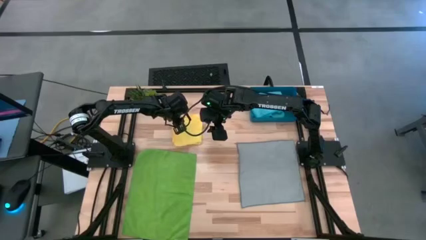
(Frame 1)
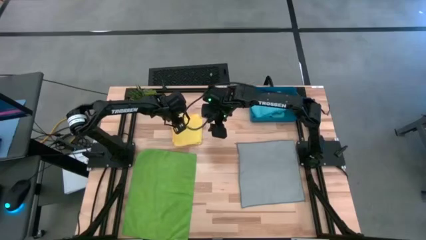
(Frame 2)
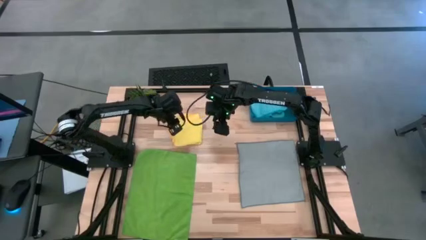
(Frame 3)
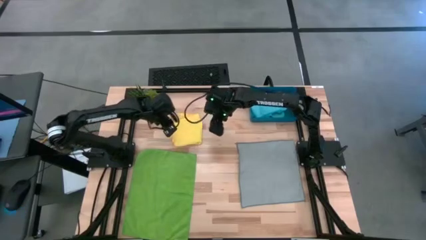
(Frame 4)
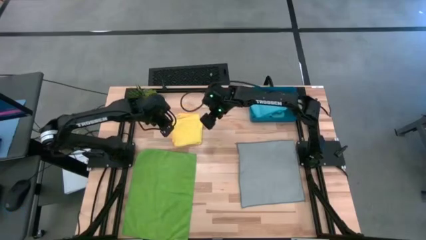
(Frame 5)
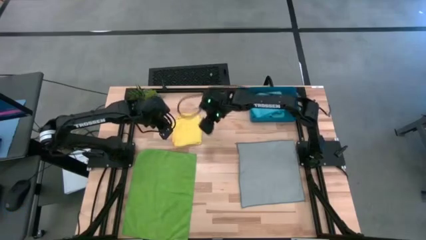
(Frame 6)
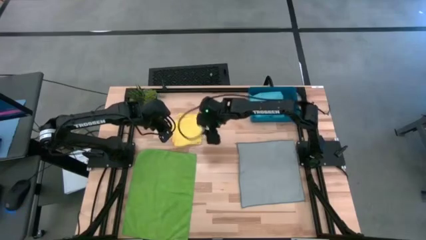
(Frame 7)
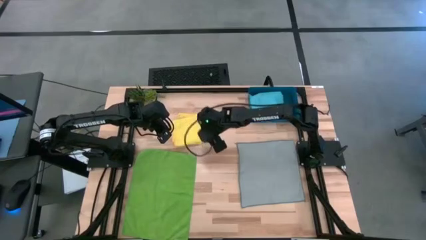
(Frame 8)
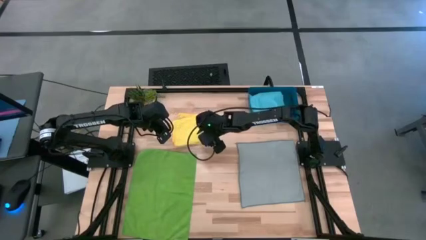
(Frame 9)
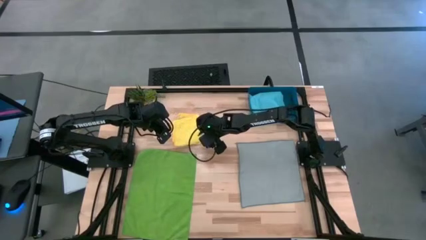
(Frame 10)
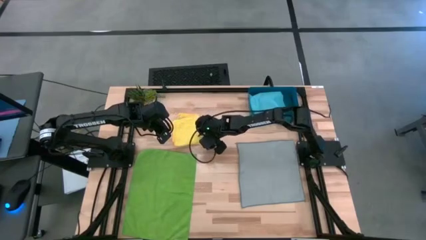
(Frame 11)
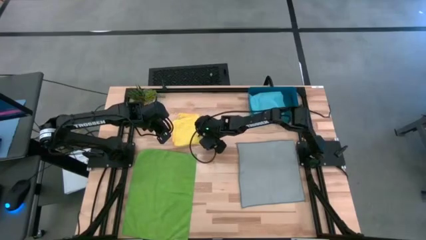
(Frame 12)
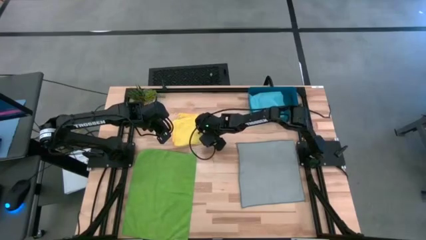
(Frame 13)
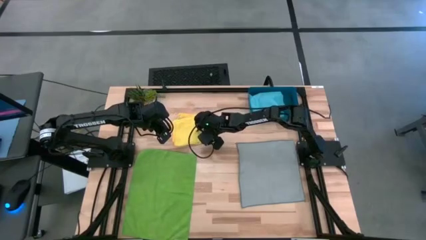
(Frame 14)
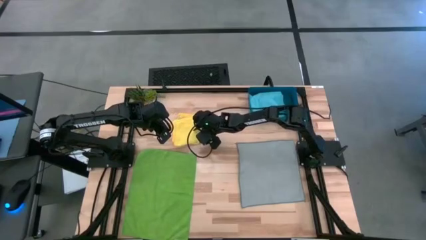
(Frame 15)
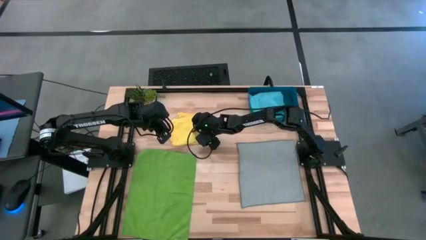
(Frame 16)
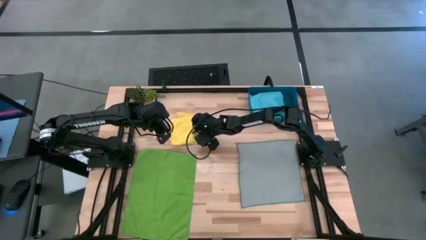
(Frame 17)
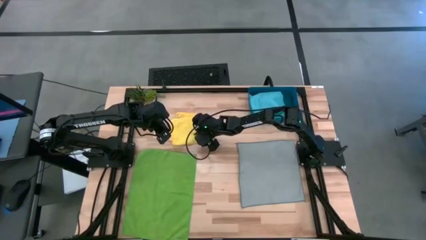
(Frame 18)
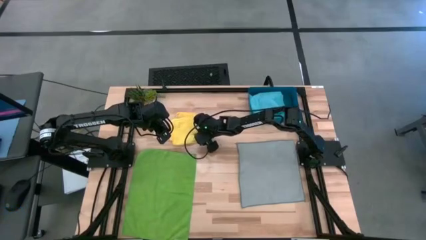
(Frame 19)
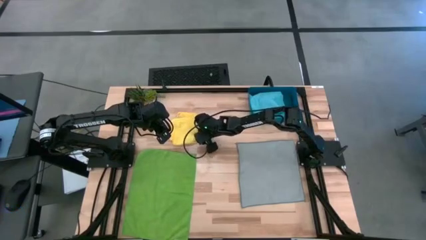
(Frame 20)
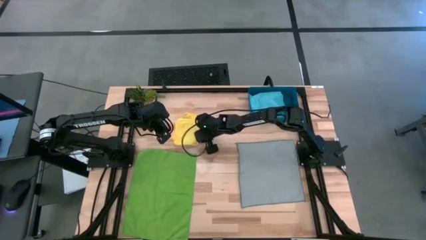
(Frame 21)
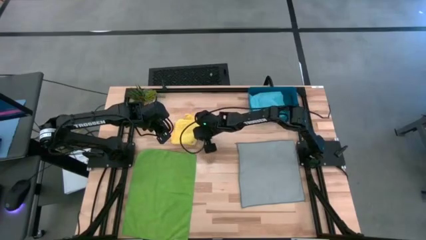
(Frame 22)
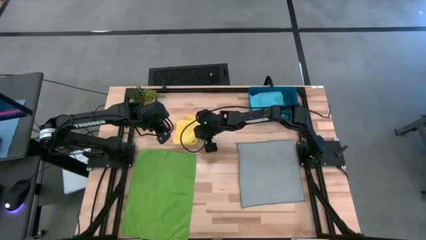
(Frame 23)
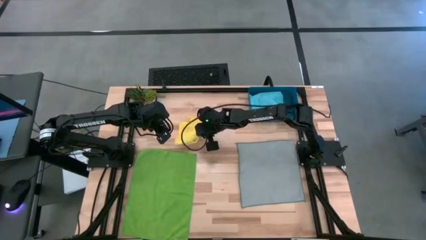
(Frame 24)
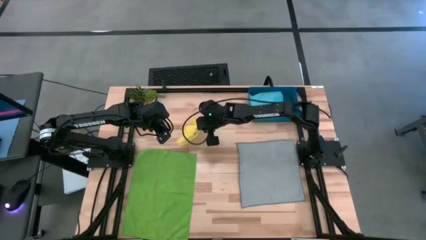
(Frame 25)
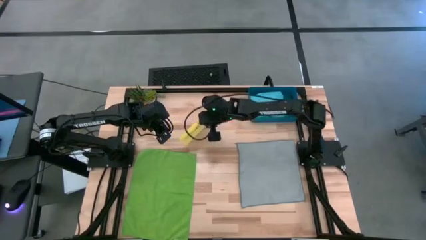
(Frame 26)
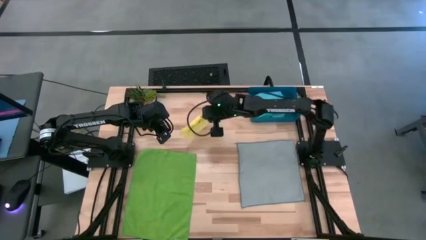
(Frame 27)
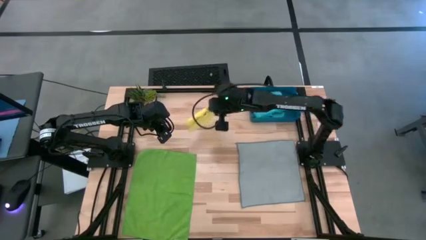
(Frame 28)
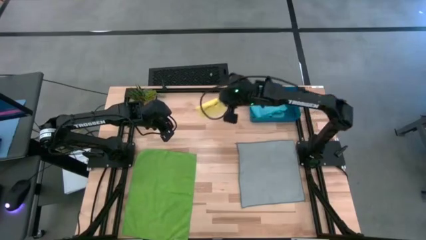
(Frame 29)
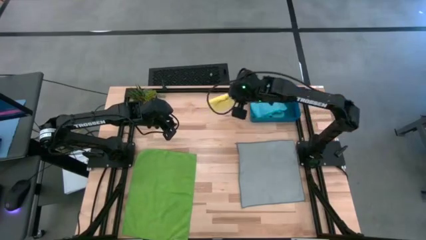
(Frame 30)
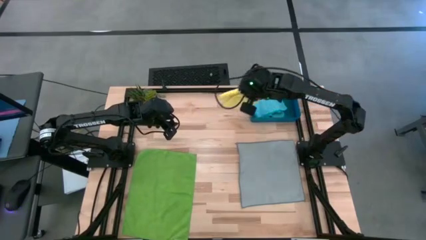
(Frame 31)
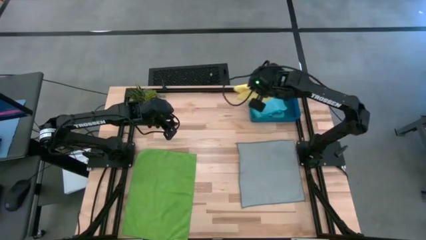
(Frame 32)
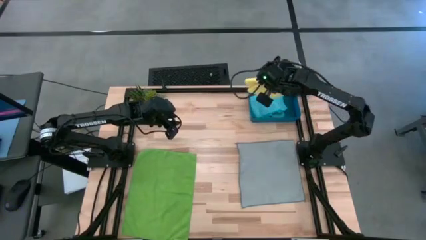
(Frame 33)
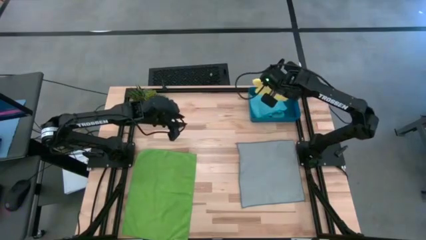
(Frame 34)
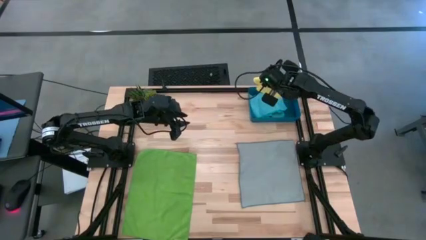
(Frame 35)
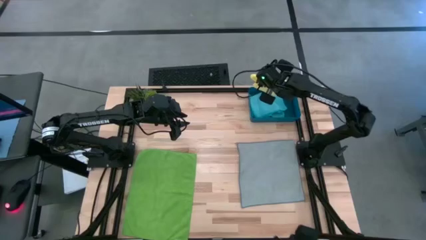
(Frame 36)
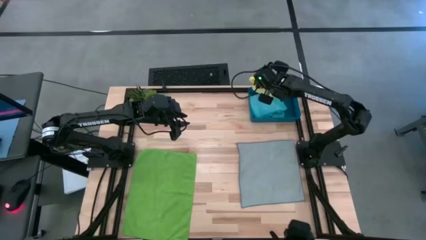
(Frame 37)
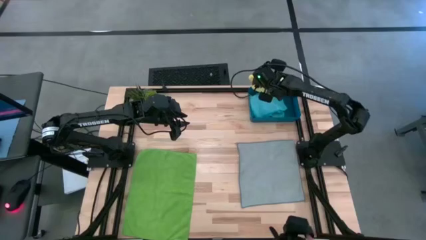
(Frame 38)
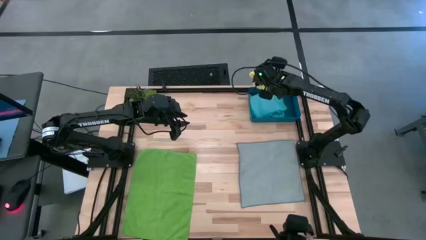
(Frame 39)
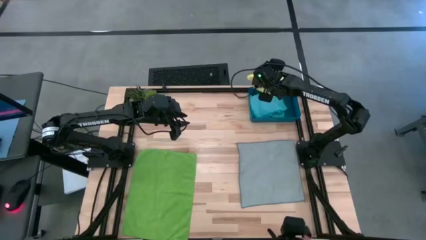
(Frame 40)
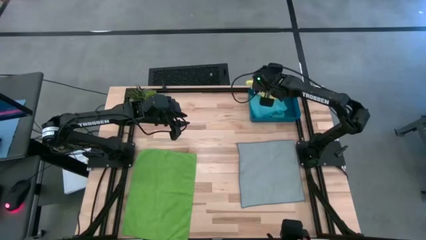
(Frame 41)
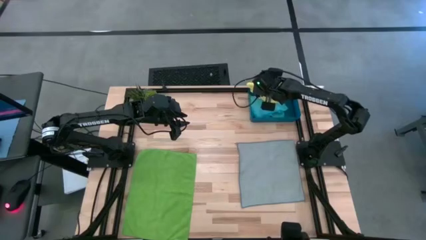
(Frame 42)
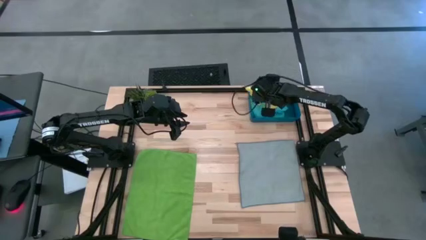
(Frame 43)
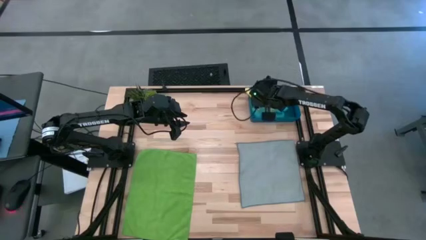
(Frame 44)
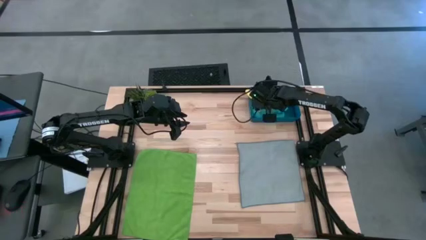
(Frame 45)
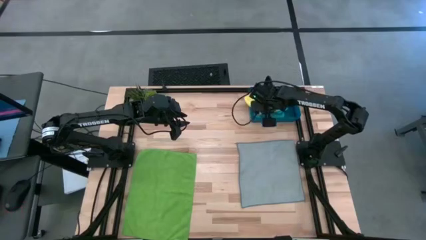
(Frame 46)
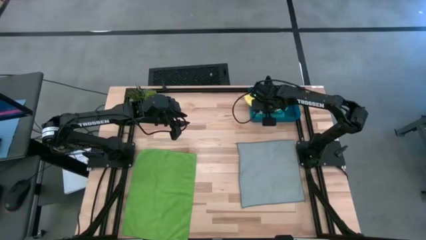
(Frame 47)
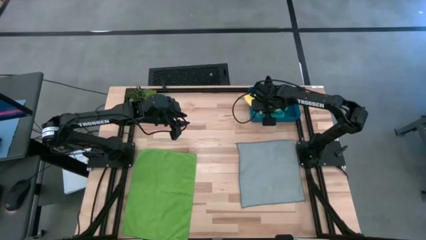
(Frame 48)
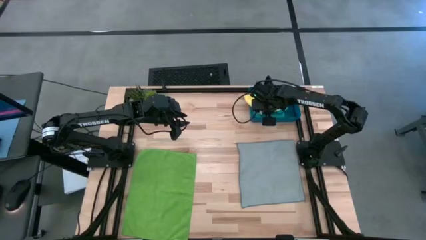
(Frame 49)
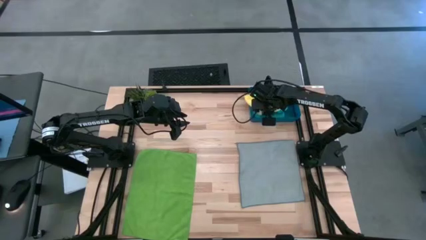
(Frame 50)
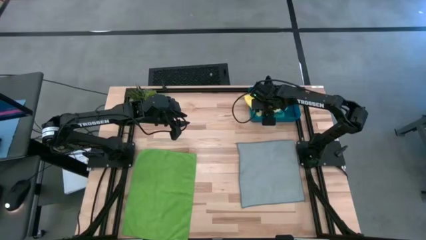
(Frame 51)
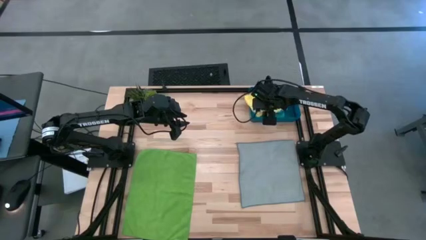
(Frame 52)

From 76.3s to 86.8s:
Task: Fold microfiber towels
Stack the yellow microfiber cloth on top of the blue microfiber cloth in the blue bin

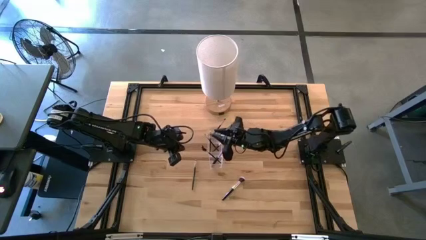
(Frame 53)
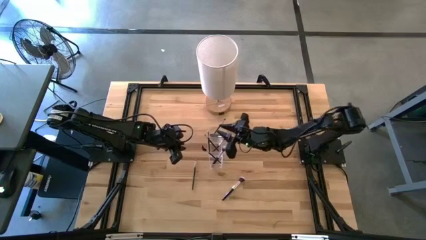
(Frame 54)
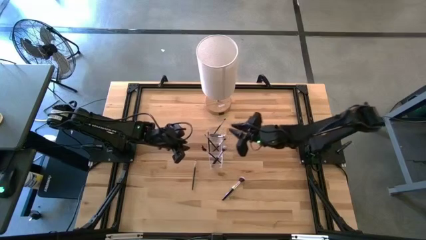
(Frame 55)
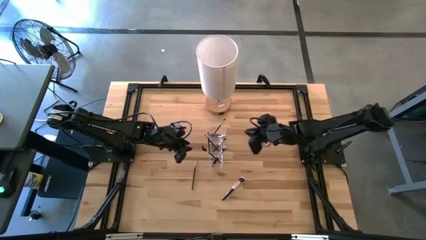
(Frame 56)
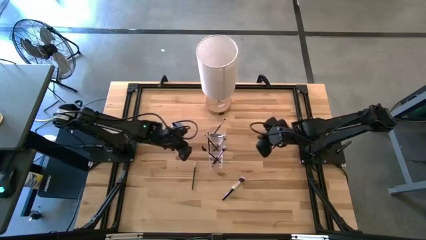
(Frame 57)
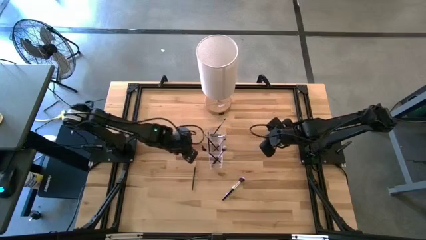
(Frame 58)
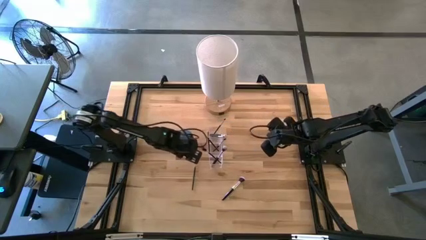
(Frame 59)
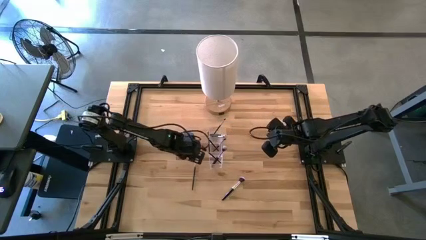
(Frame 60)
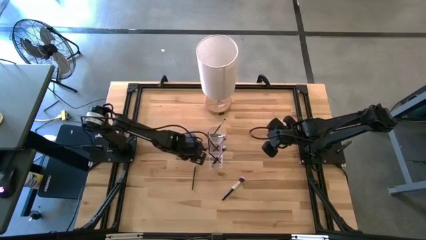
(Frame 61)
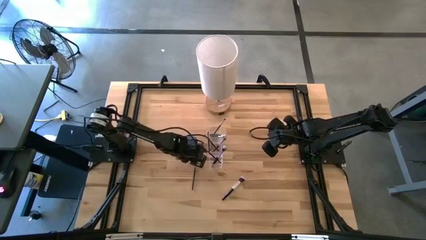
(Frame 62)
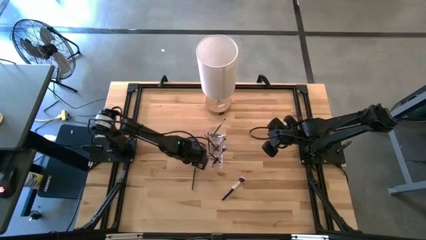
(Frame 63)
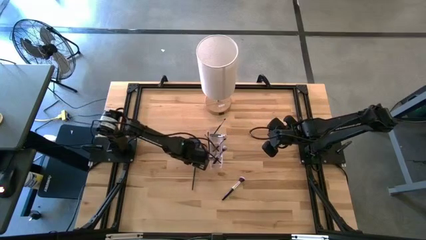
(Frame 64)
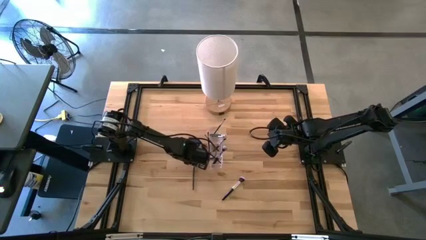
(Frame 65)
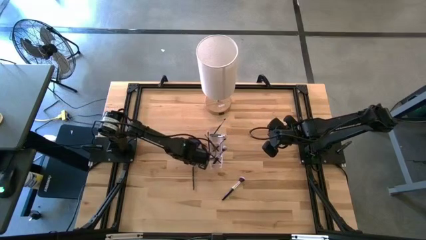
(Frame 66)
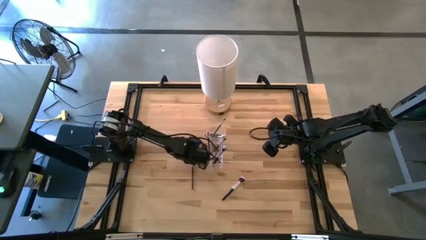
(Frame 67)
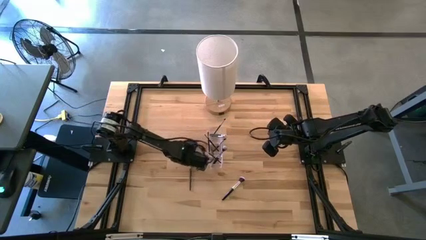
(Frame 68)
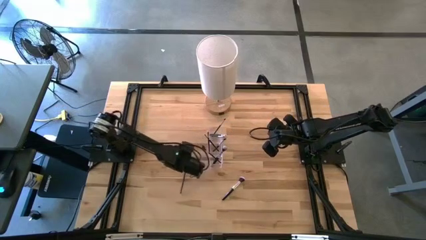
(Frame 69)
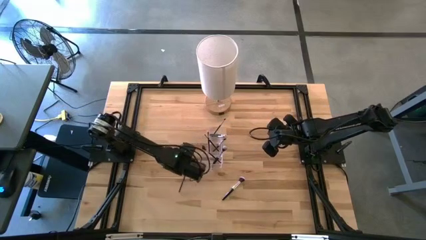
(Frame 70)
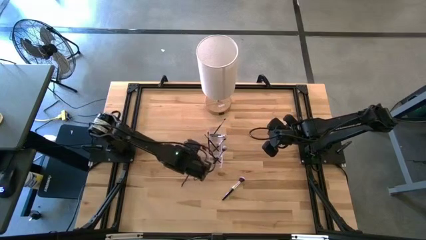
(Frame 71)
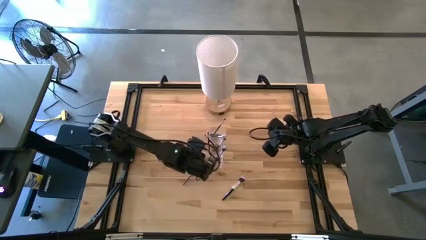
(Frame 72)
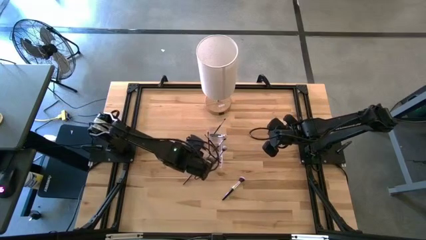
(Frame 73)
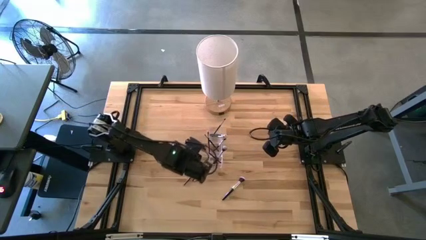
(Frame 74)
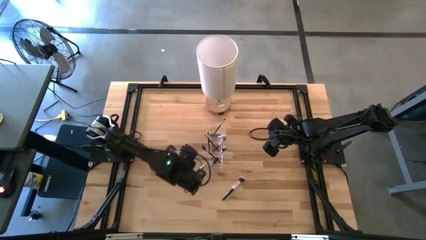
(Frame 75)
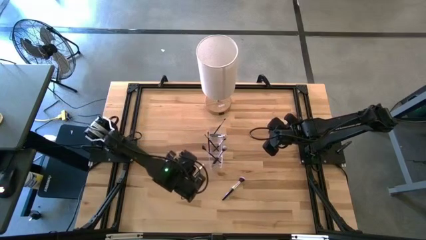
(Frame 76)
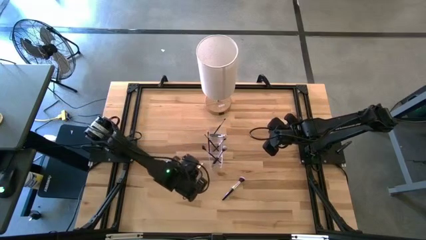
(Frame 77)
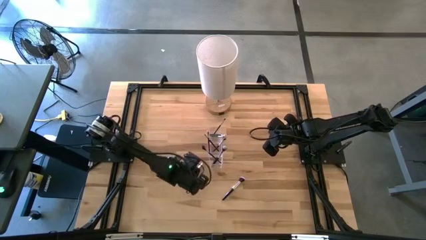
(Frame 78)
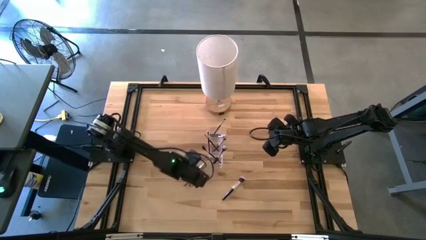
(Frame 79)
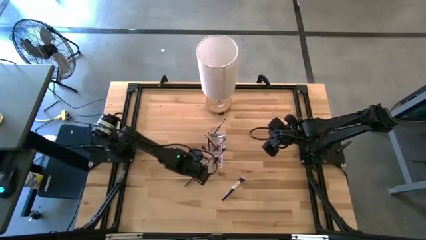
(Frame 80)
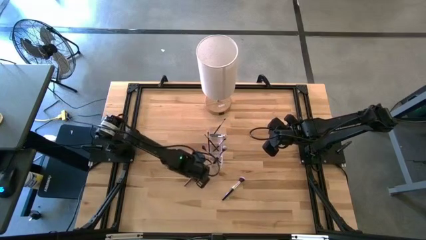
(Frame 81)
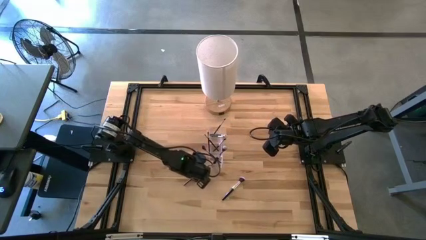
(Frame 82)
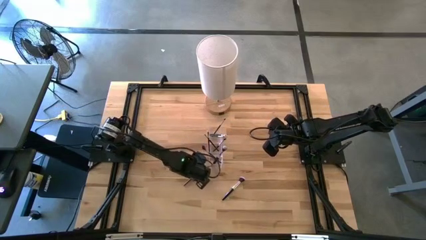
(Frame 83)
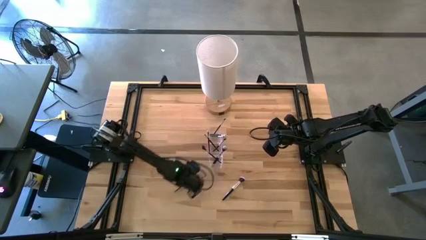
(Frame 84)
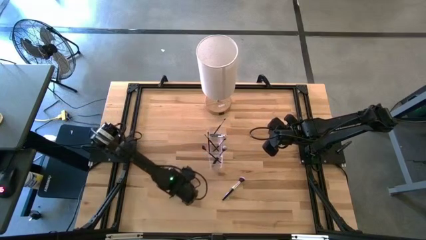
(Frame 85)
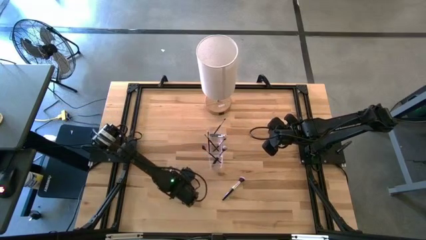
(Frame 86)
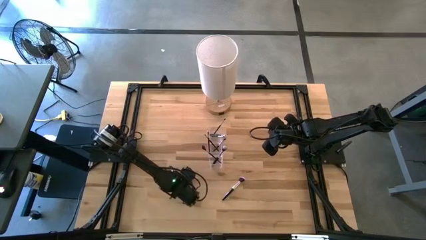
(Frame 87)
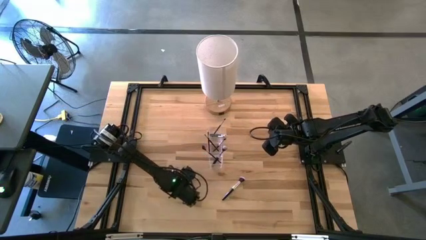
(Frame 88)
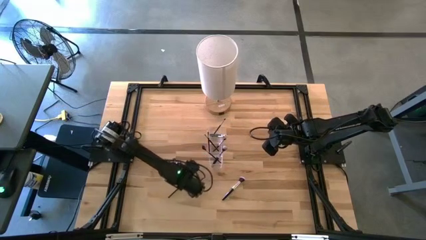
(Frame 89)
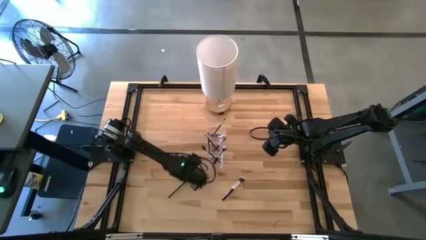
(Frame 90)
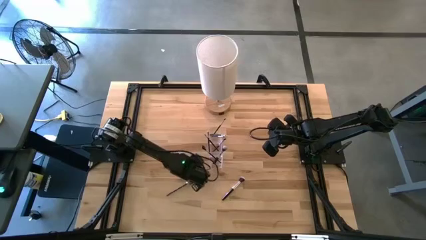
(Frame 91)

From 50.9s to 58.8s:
Task: Put items in baskets/containers
Put the black eyeshadow brush into the transparent organizer
